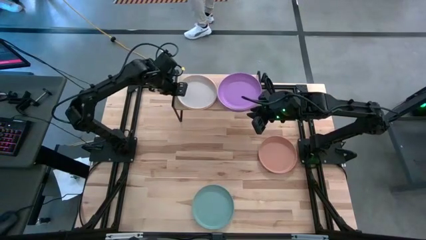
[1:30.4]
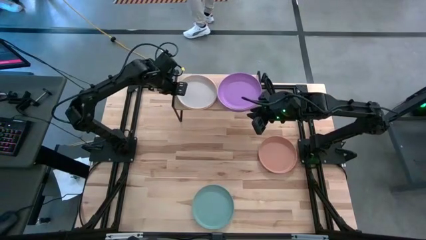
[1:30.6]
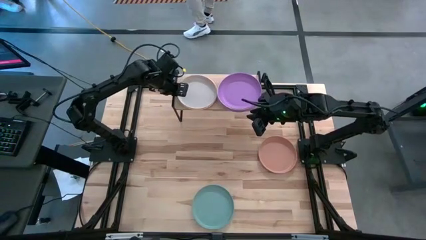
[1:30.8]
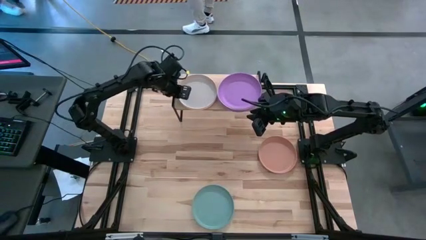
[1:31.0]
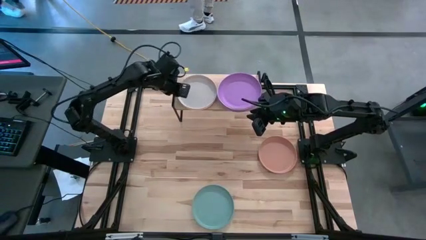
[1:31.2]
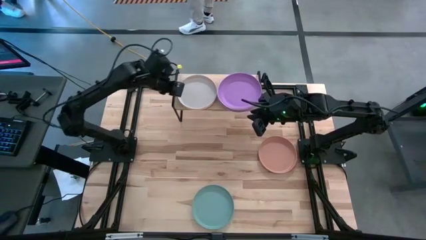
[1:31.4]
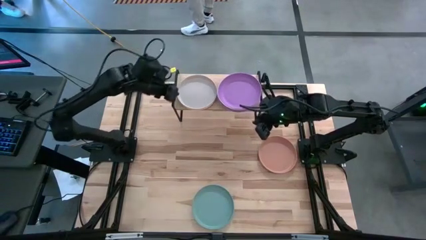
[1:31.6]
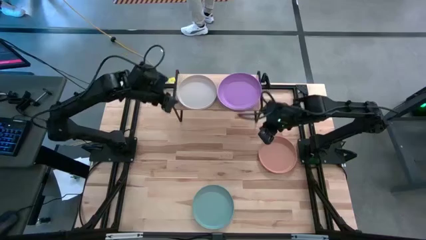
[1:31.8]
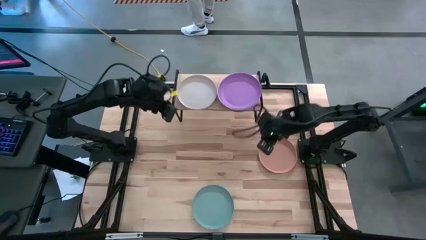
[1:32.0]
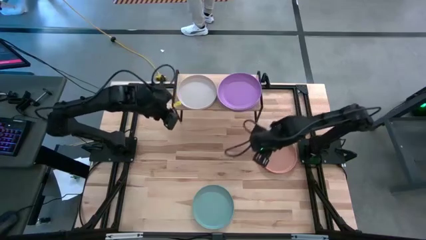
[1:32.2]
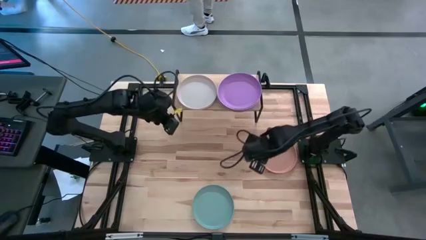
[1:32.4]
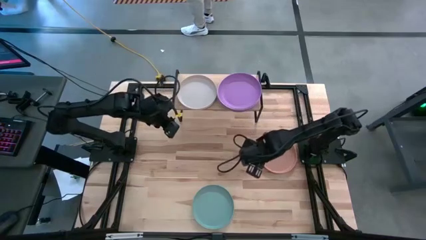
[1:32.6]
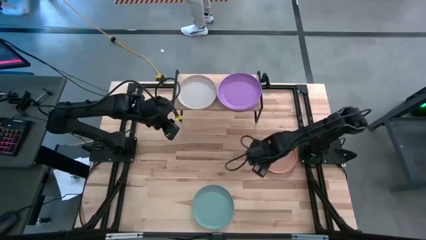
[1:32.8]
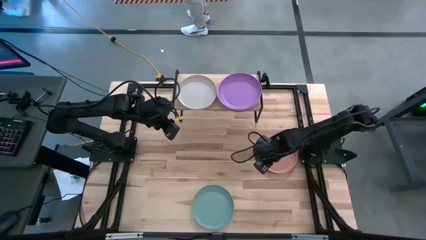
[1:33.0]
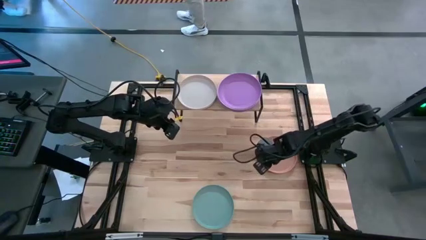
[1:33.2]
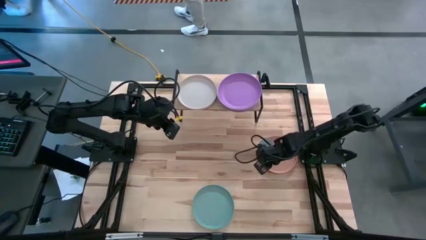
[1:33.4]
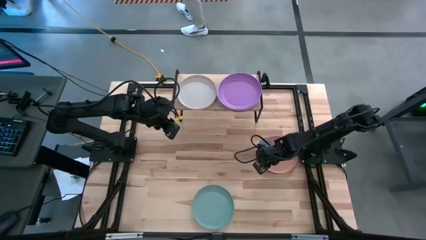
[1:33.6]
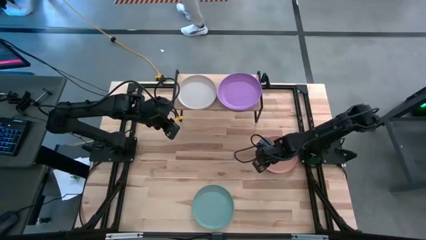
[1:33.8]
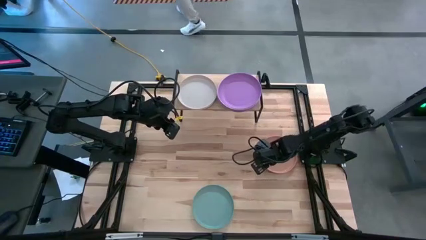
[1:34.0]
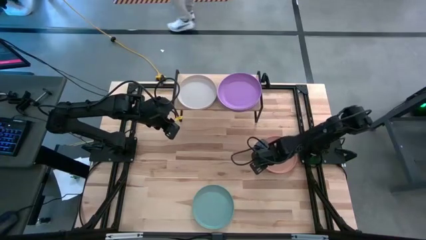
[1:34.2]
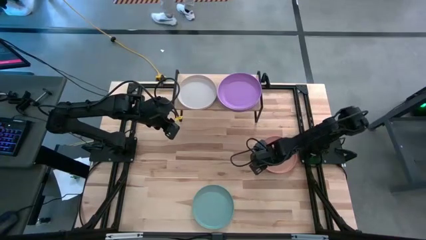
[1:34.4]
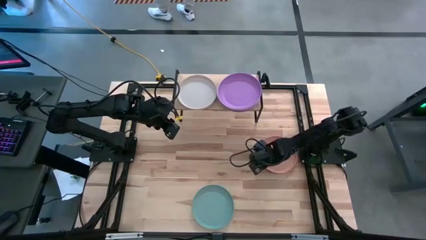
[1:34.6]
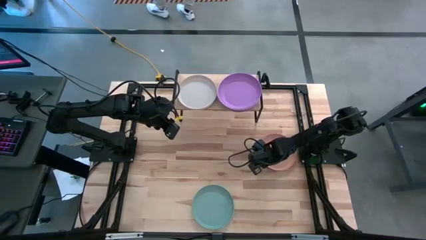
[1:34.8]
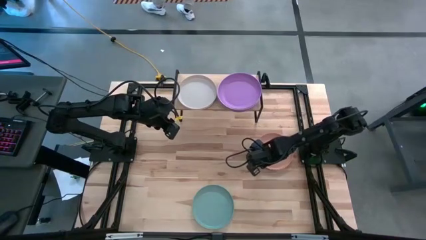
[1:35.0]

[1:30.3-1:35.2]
Task: Place and stack plates onto a shelf
Stack the orange plate on the white plate on the shelf

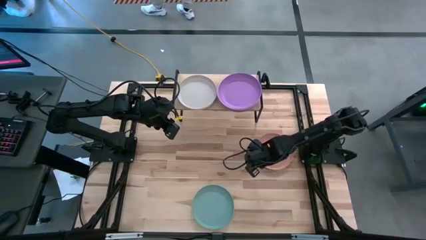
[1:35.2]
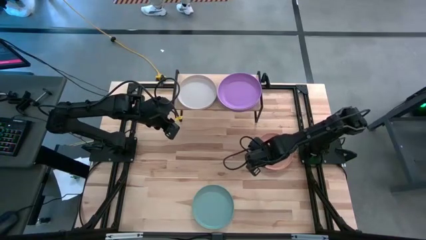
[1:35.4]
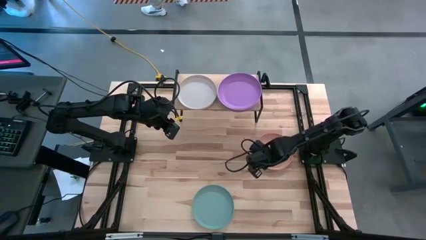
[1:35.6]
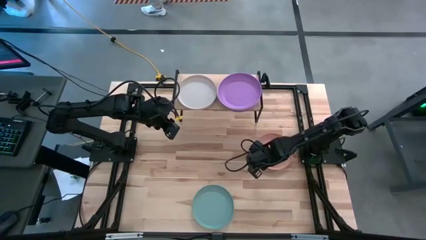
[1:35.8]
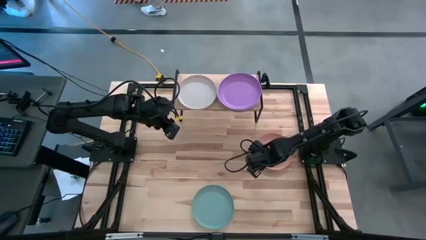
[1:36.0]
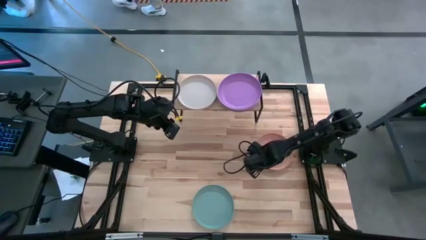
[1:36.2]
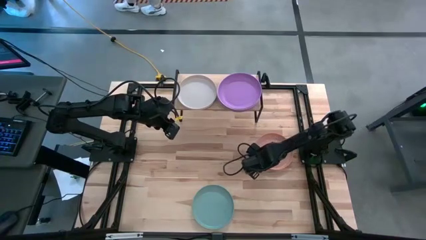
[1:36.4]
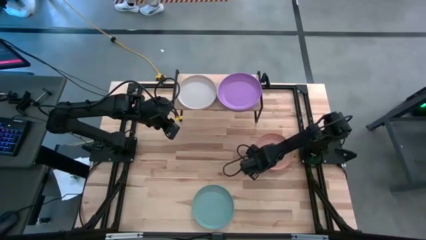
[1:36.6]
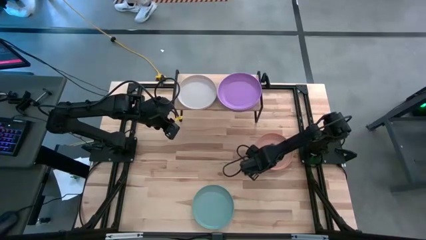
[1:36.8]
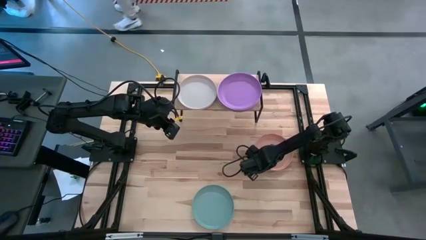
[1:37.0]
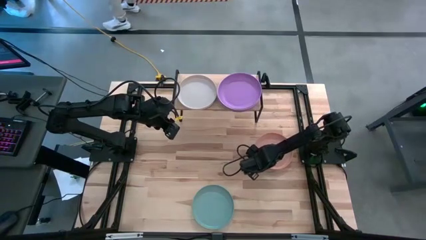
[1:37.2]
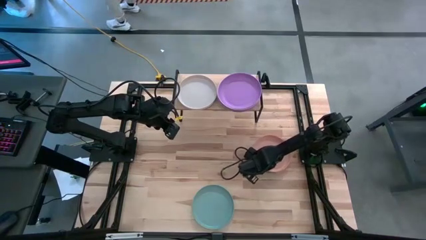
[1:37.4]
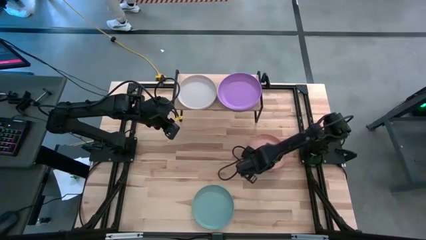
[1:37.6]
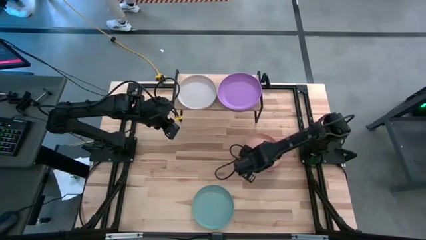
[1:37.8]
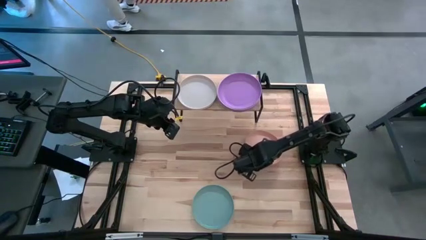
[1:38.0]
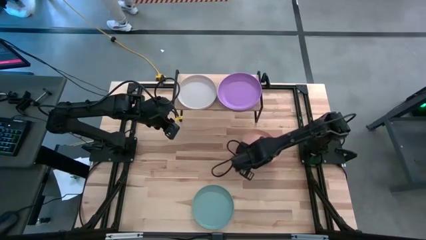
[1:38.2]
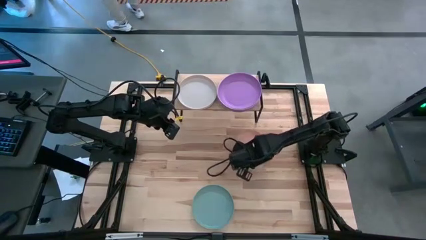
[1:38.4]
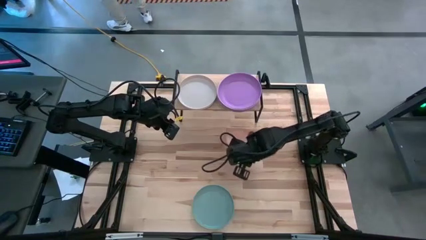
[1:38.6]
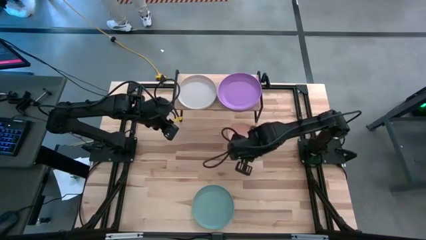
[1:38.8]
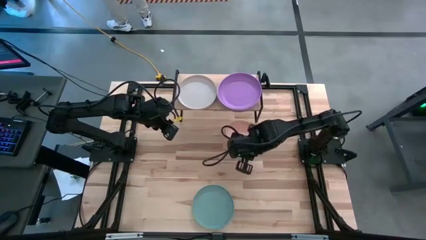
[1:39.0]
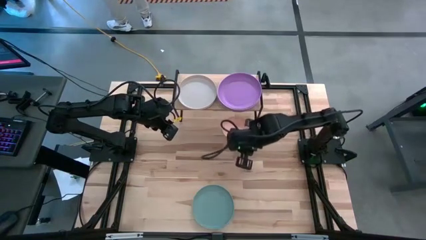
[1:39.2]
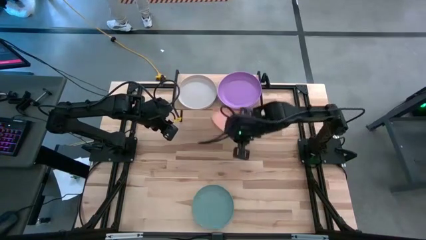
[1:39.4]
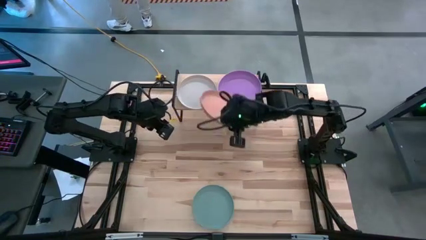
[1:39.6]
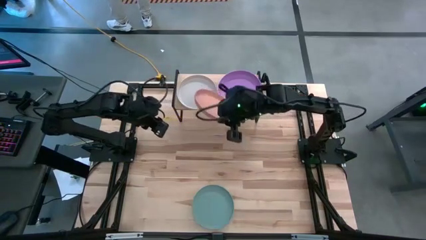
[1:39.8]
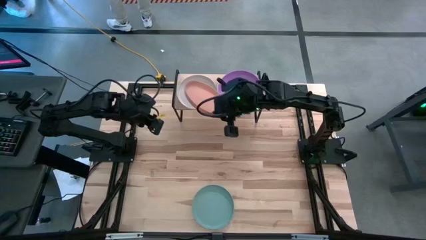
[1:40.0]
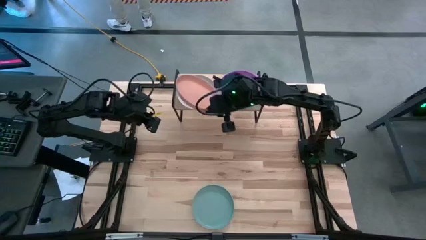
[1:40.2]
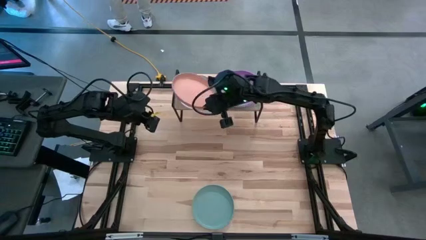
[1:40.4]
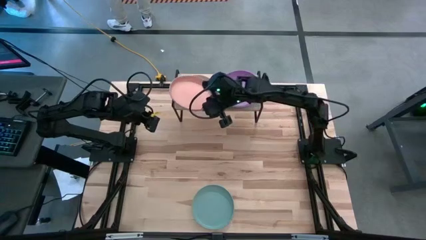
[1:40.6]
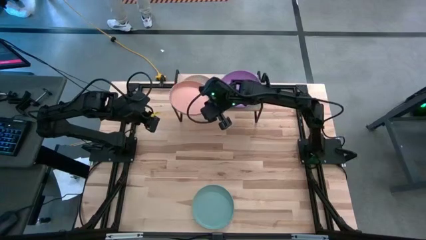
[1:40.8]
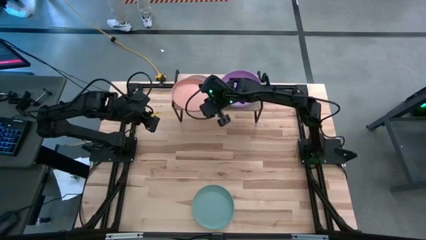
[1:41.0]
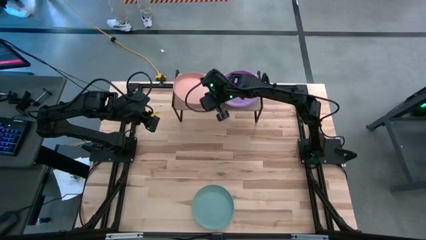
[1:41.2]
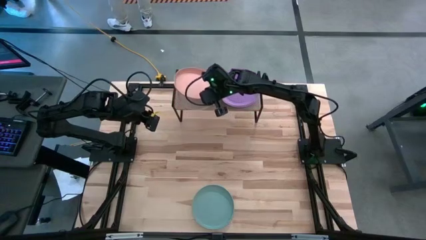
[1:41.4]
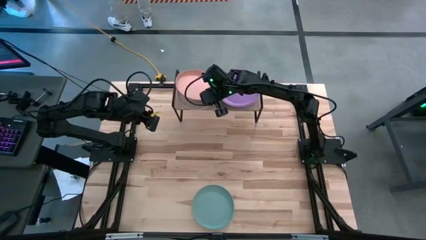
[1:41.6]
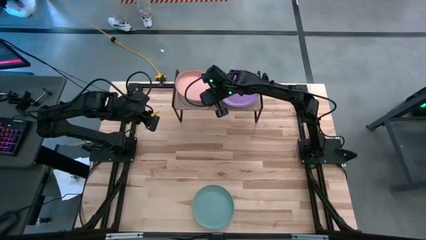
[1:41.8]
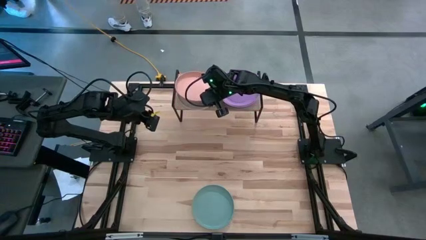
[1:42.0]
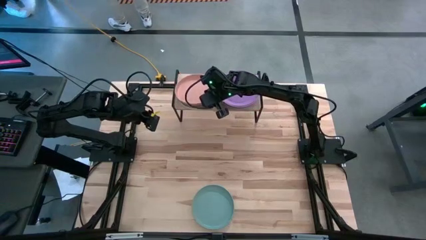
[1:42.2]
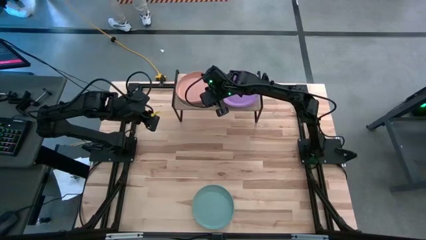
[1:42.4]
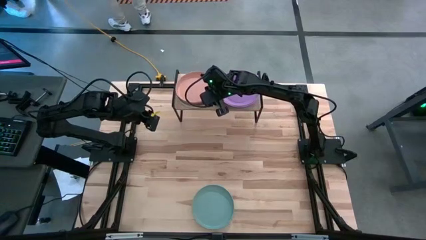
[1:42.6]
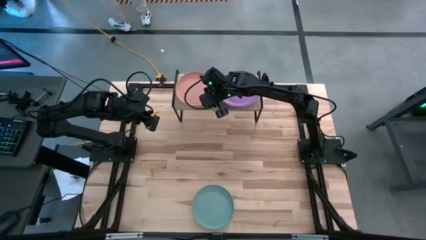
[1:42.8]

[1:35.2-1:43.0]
Stack the orange plate on the white plate on the shelf

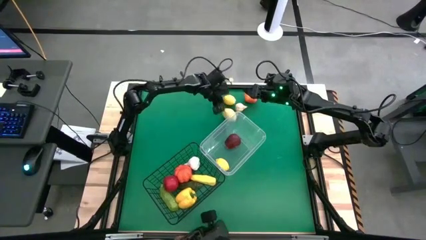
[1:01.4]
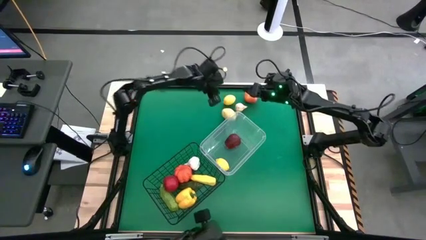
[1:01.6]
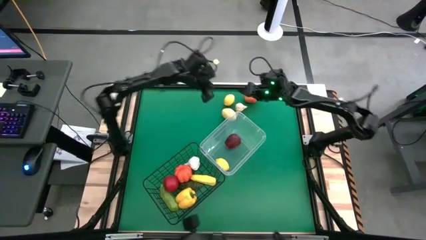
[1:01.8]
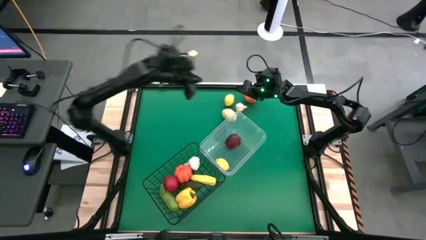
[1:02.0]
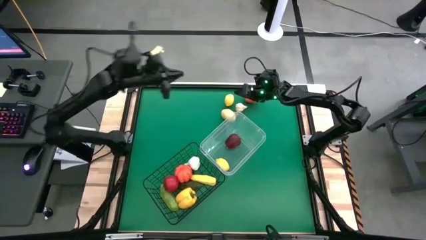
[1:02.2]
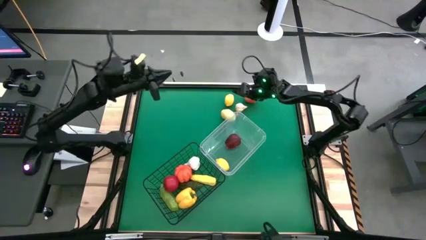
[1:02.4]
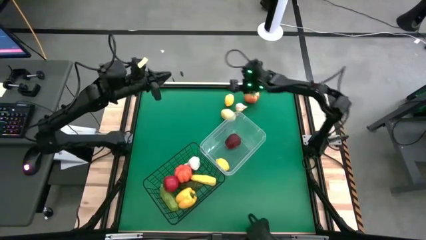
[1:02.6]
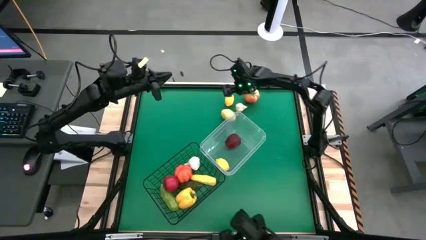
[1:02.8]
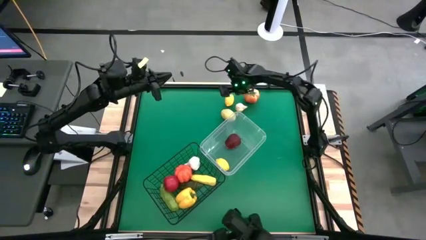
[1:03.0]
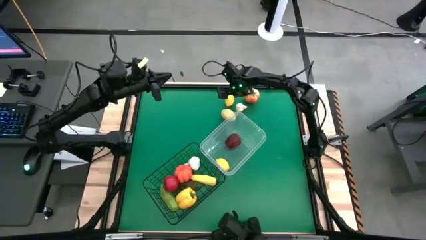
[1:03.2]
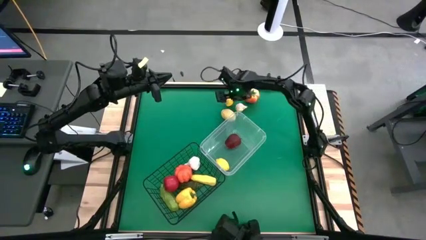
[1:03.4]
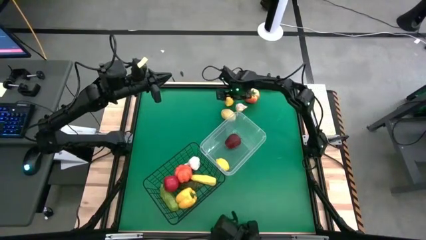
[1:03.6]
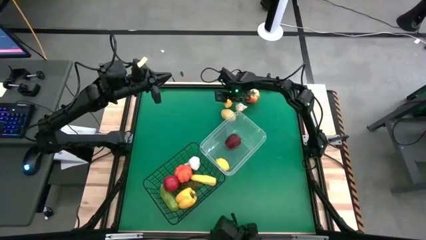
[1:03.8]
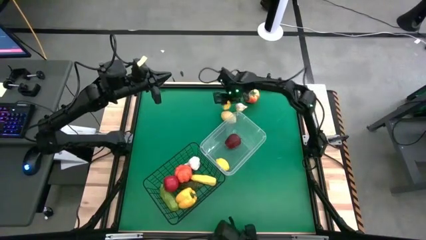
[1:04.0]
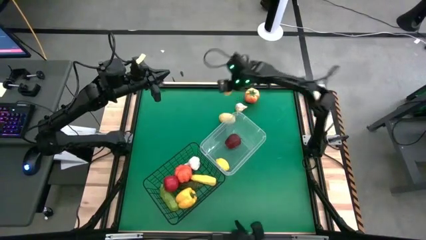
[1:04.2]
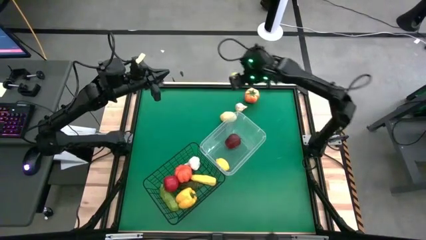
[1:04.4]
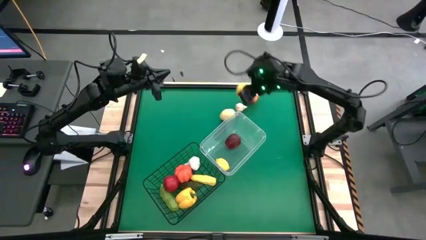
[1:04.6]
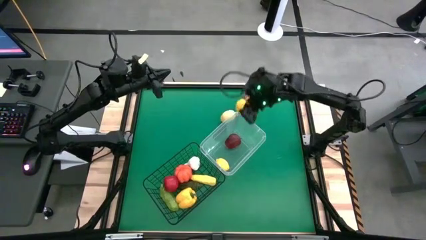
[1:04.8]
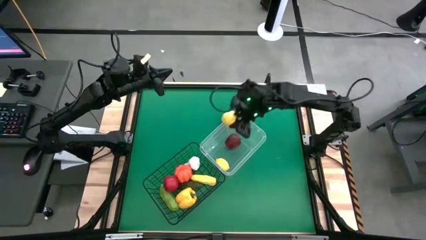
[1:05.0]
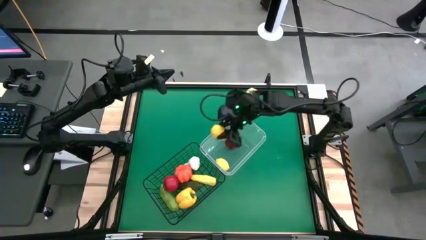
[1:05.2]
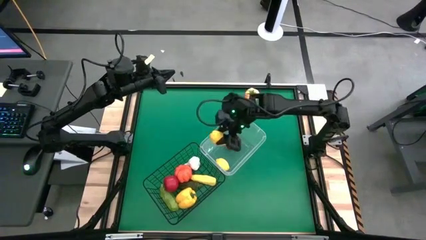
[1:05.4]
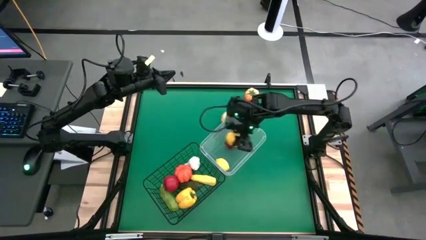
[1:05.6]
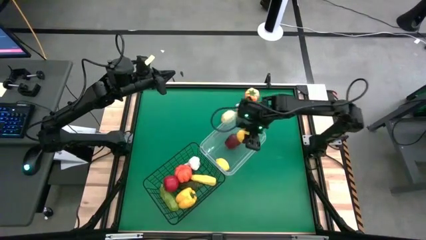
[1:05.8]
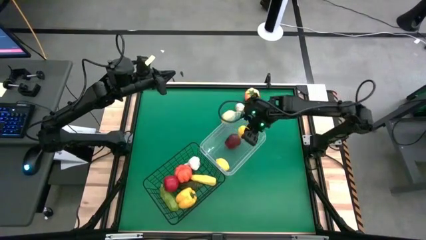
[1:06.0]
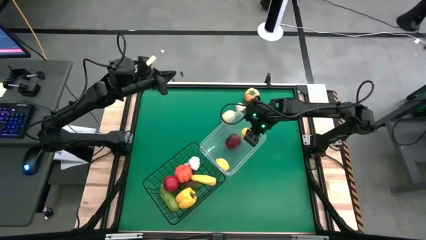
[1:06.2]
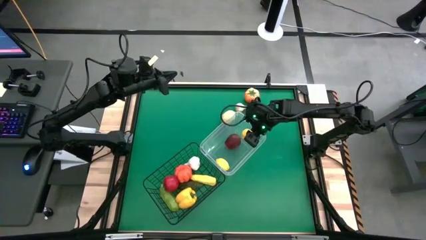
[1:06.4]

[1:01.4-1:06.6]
Task: Sort produce into baskets
Put the top lemon into the transparent bin
